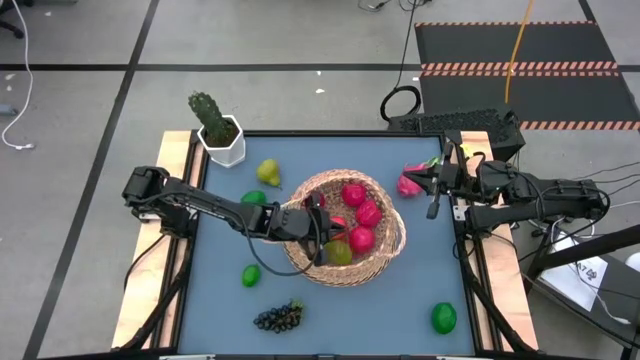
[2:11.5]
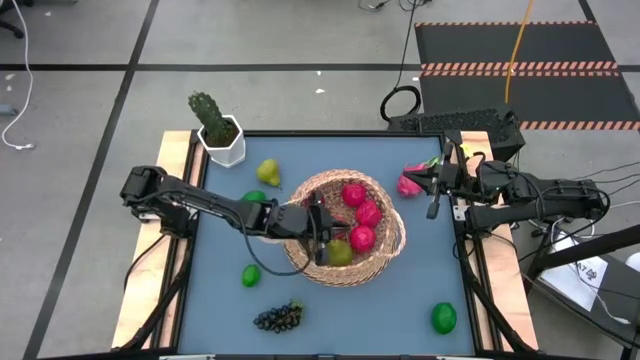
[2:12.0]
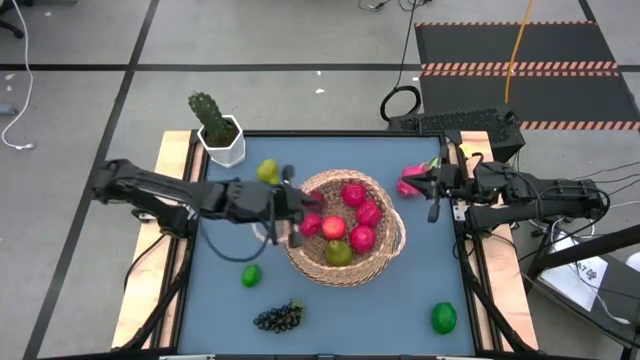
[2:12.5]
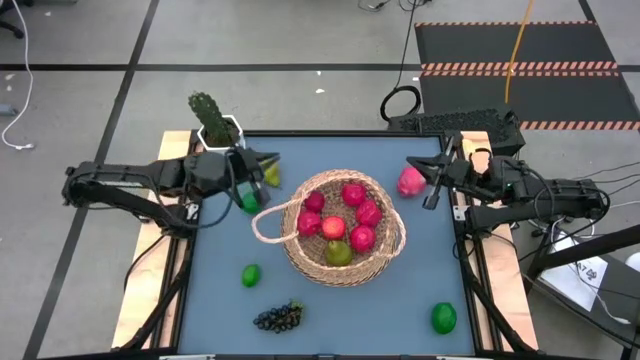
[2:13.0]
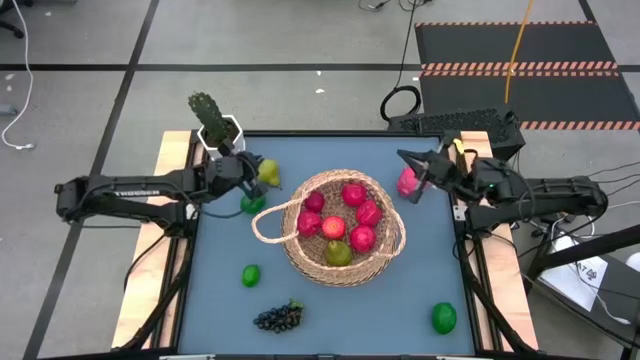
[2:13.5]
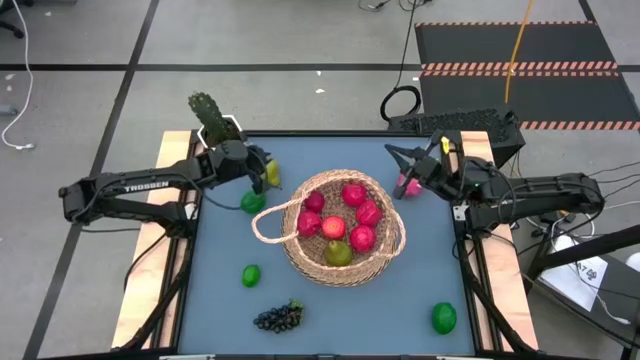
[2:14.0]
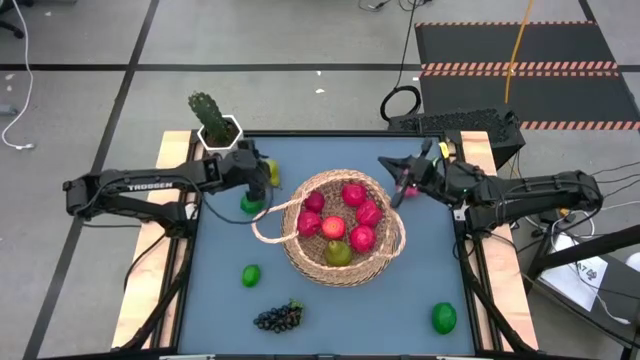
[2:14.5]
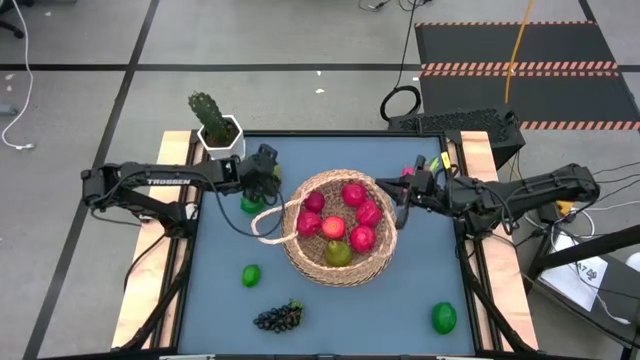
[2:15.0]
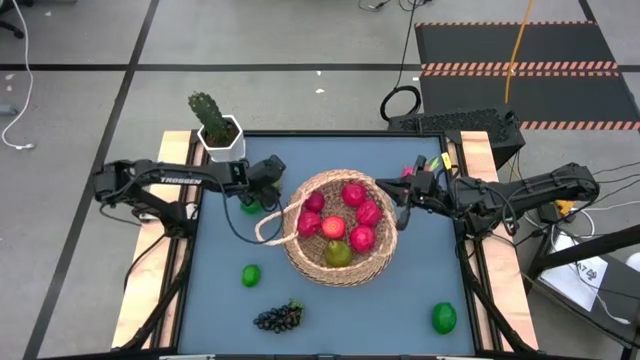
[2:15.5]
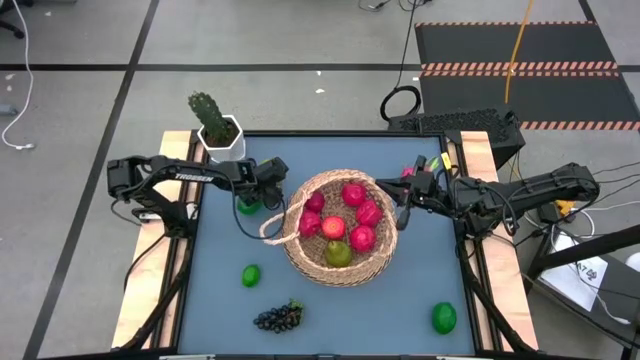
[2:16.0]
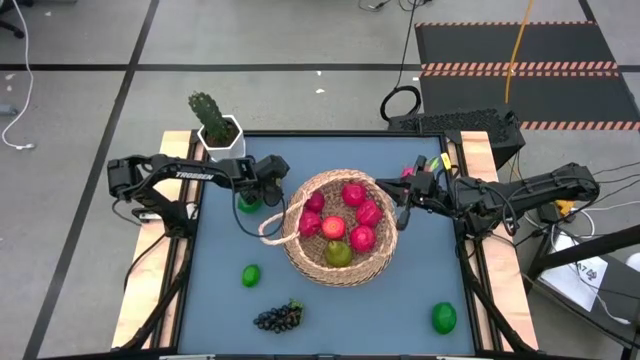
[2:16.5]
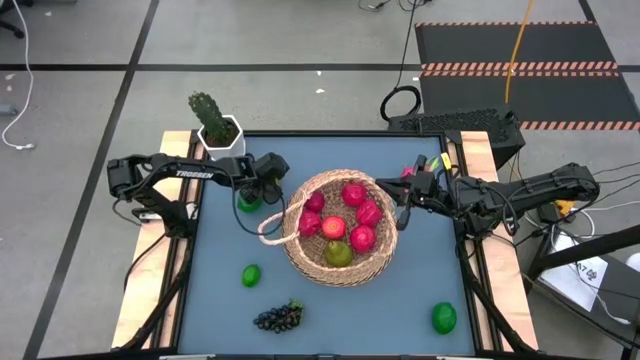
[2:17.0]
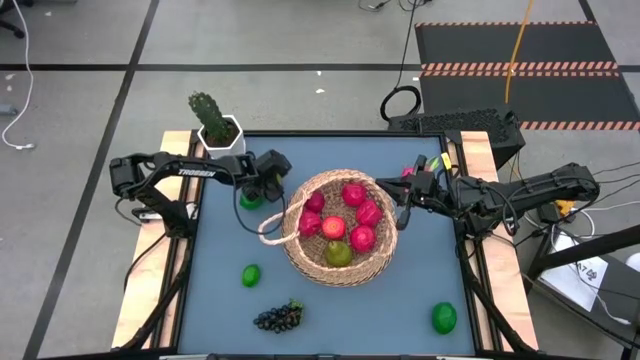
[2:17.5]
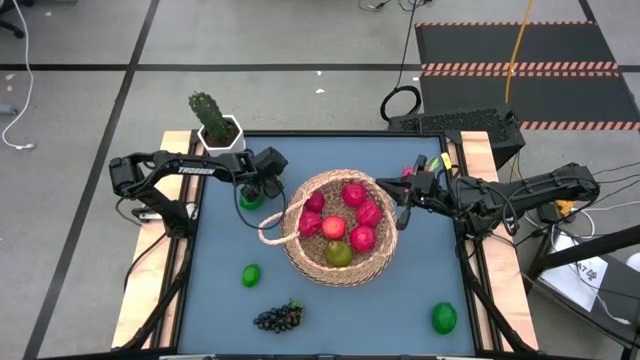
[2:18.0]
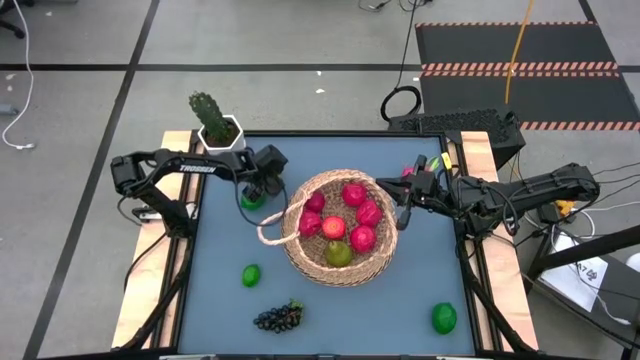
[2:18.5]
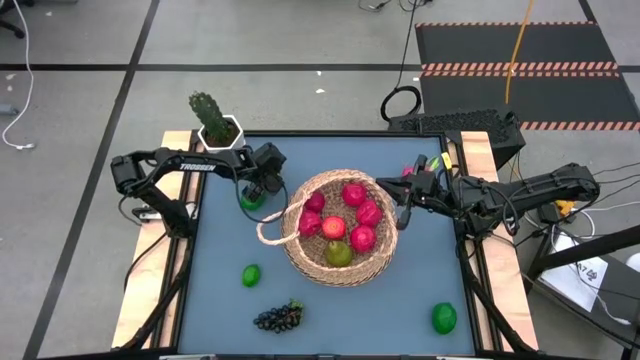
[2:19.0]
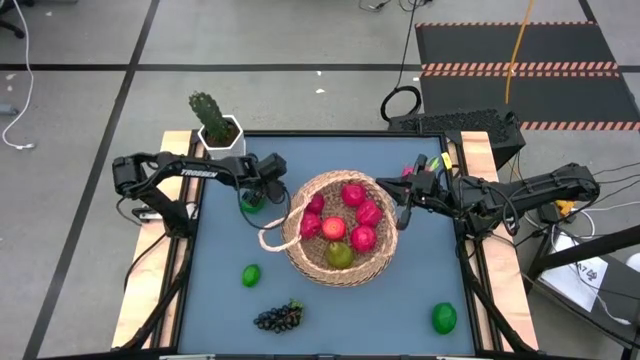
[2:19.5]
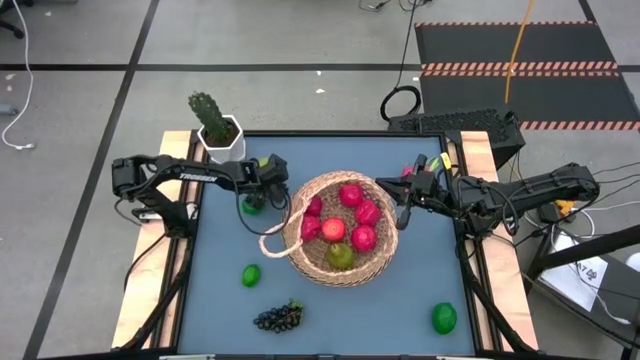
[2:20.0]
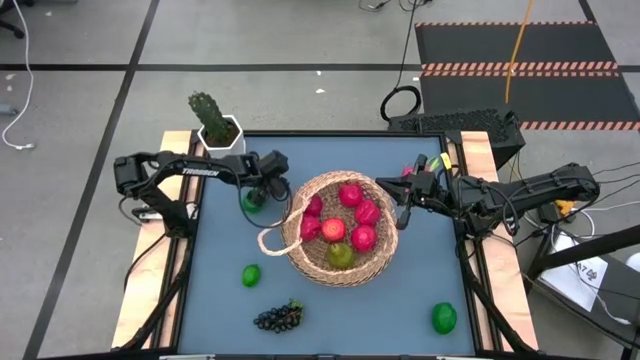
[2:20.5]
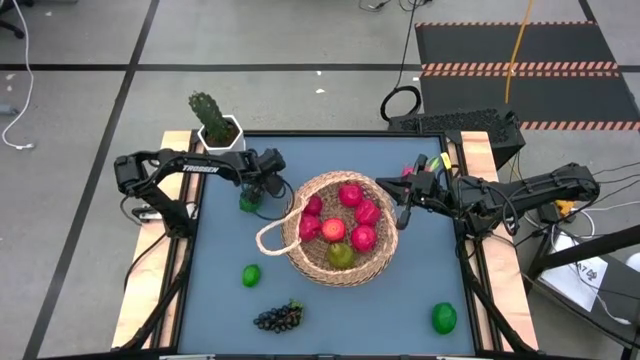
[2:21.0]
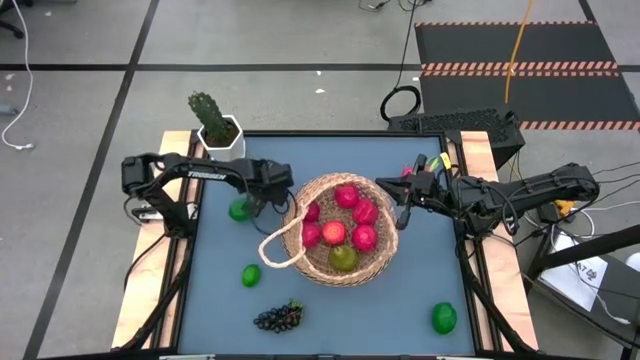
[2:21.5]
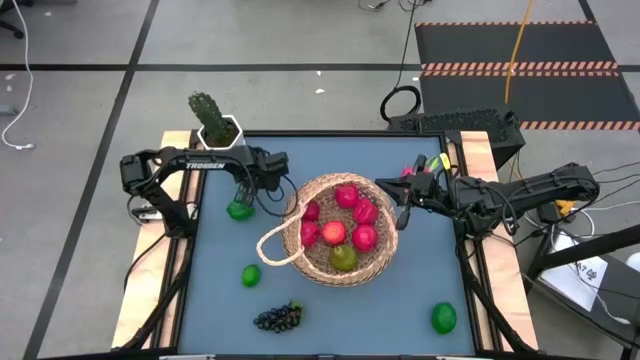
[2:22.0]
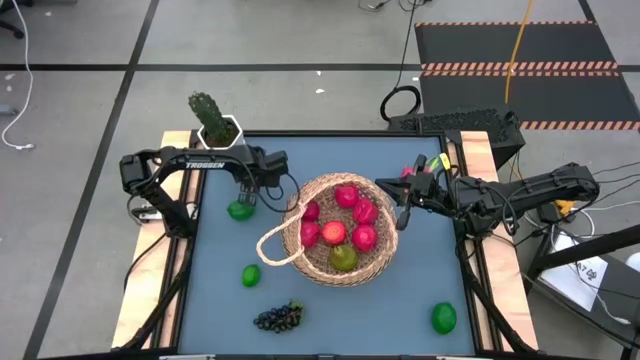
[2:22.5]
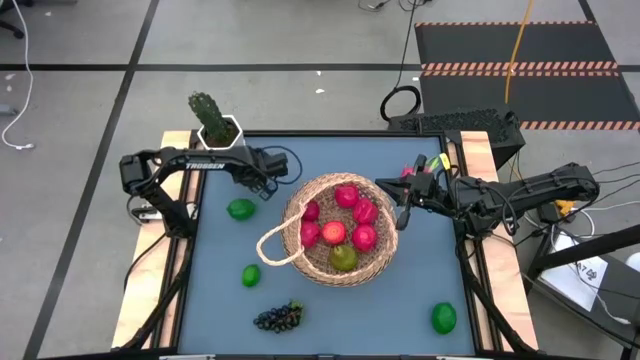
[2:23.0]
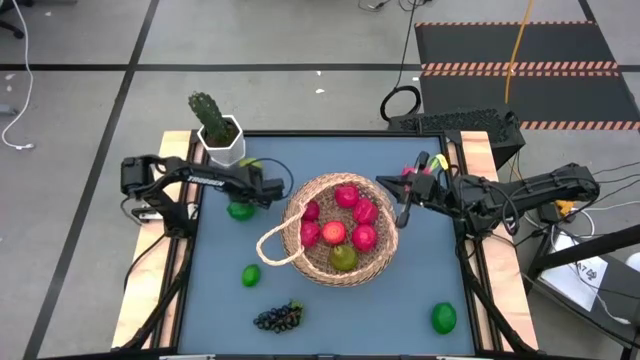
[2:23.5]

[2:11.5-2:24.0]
Task: Build produce basket
Put the light green pear into the brown basket

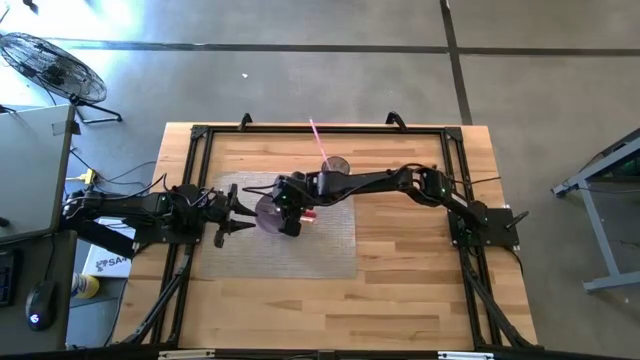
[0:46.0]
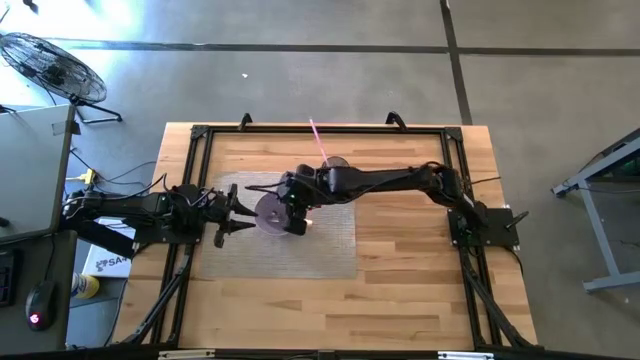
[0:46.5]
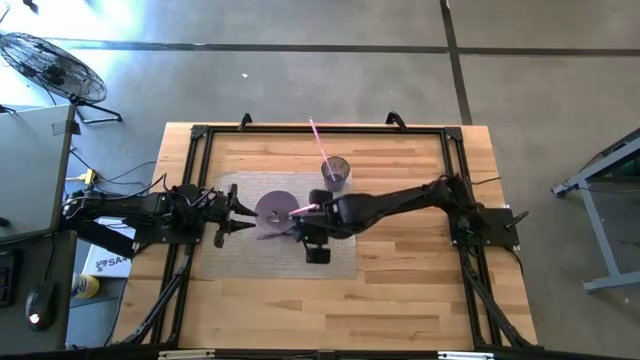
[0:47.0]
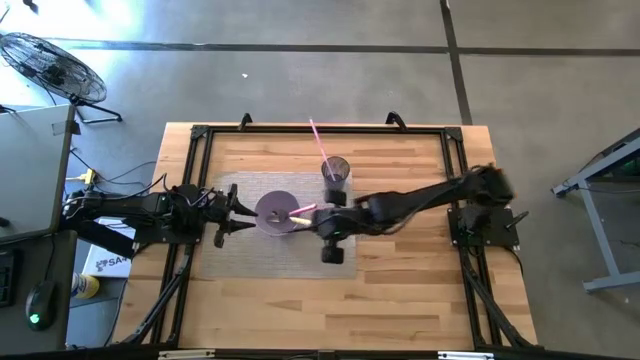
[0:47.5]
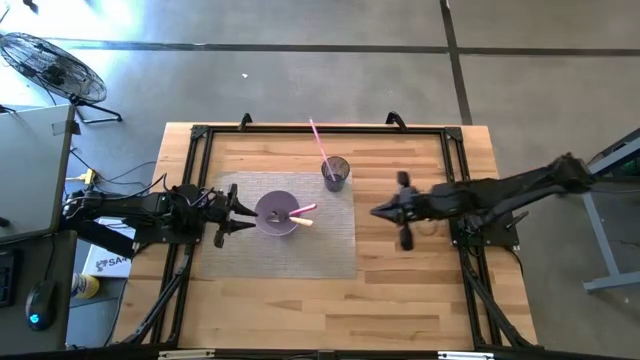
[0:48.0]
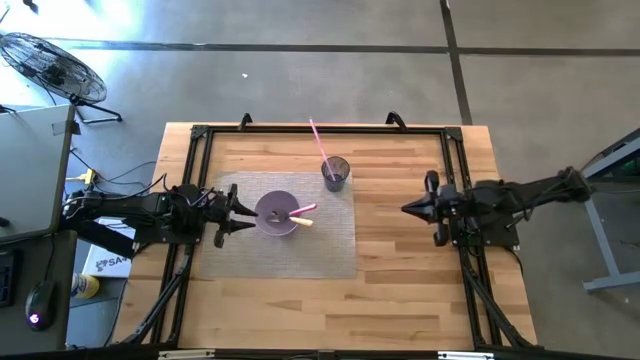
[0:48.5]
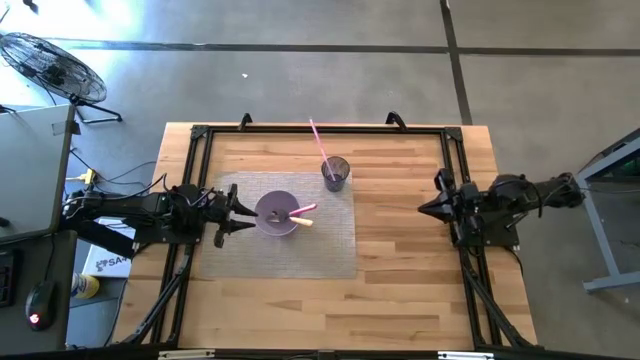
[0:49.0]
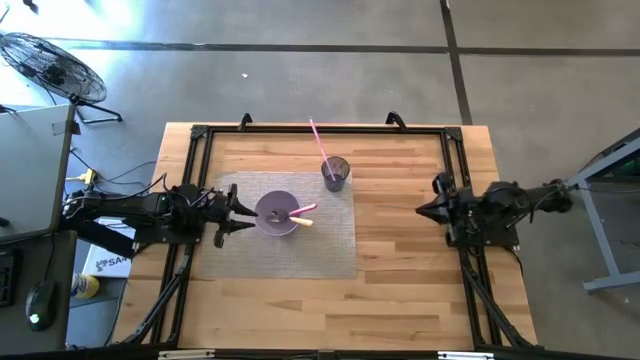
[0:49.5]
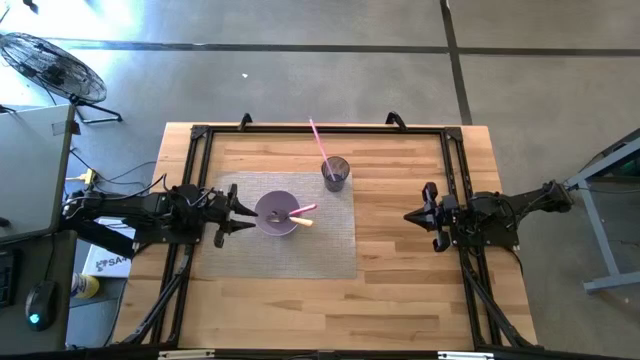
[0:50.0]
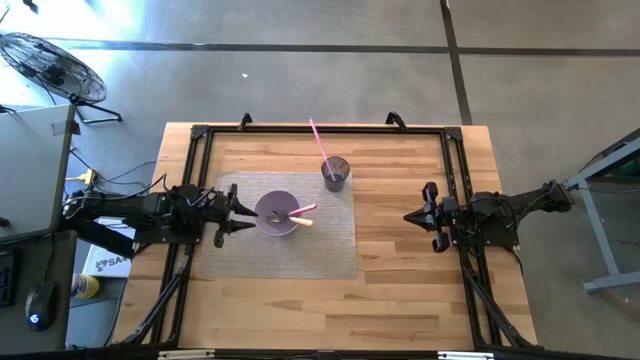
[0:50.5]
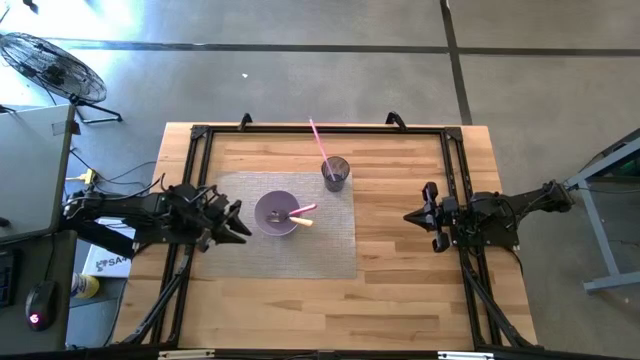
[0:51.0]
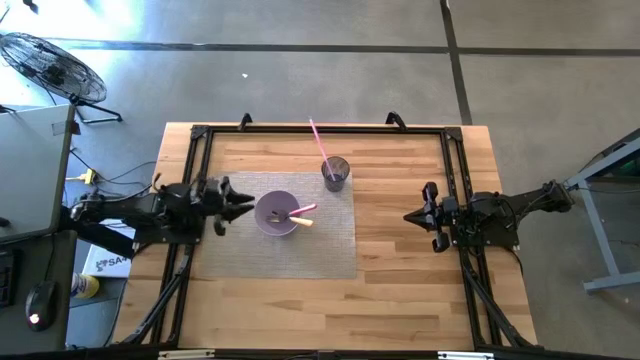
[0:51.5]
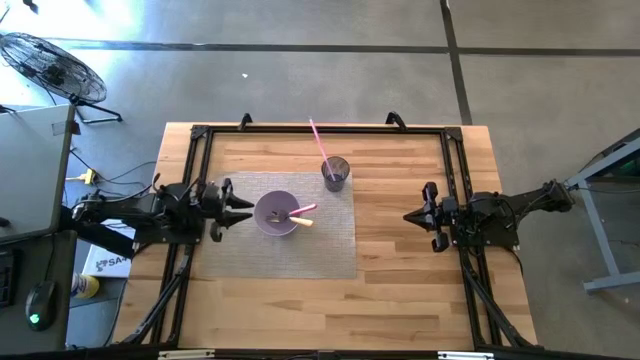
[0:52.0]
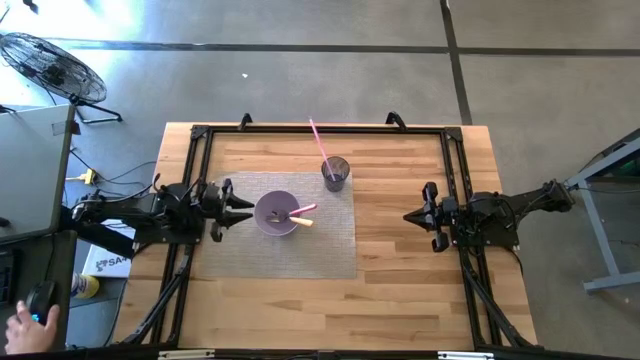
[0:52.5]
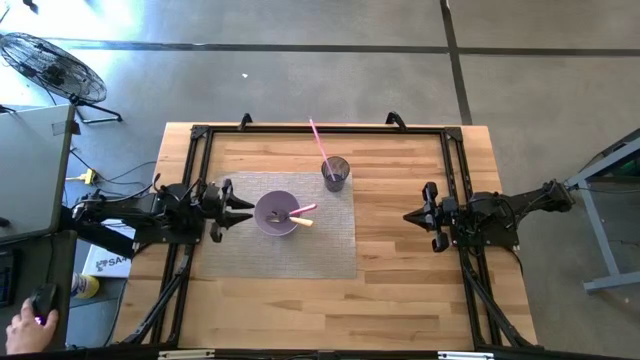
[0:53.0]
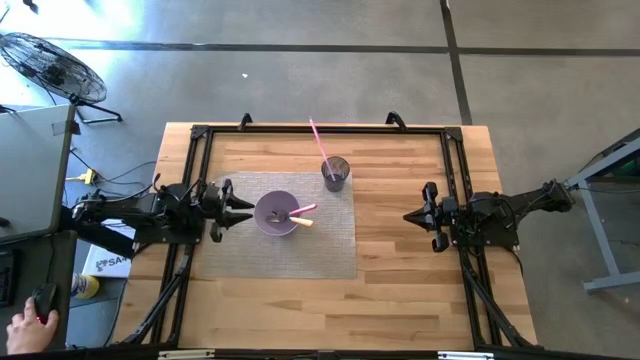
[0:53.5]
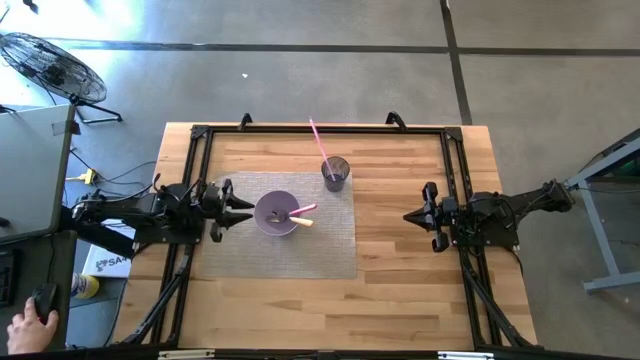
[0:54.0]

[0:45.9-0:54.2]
Task: Pick & Place Utensil
Return to Home Position
